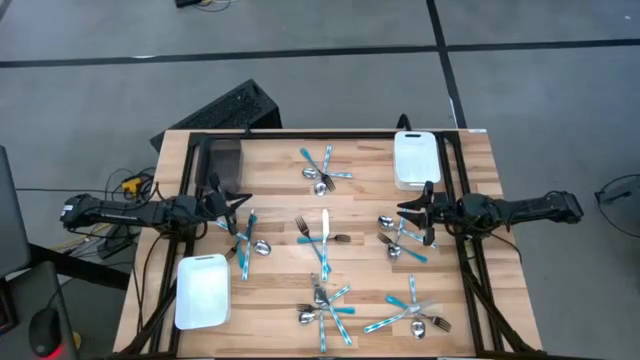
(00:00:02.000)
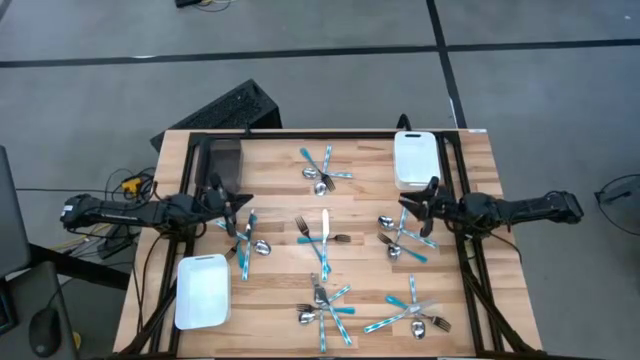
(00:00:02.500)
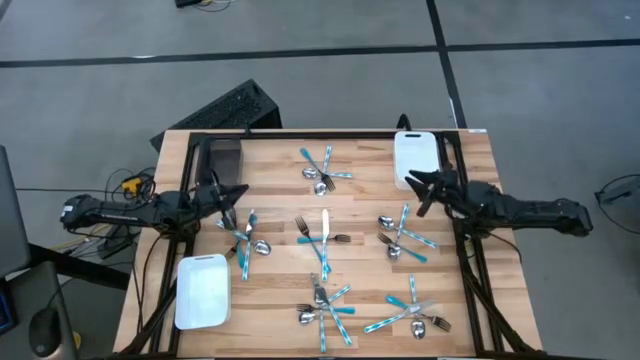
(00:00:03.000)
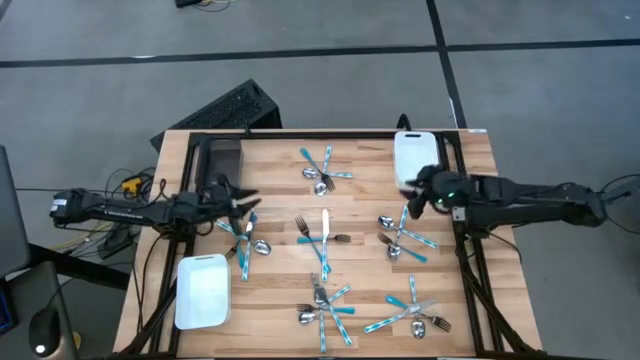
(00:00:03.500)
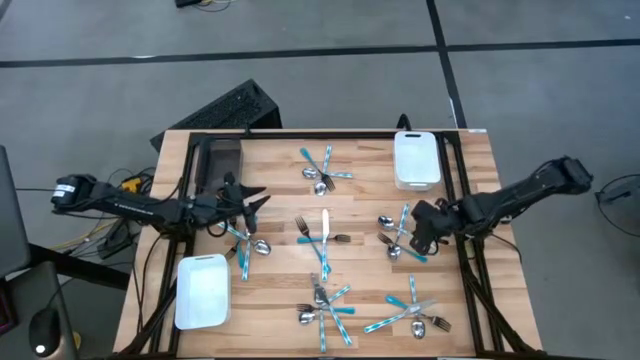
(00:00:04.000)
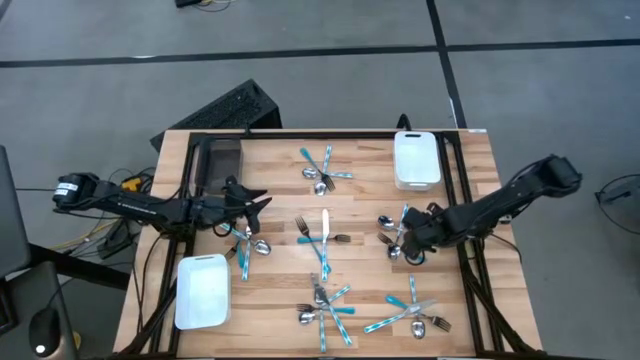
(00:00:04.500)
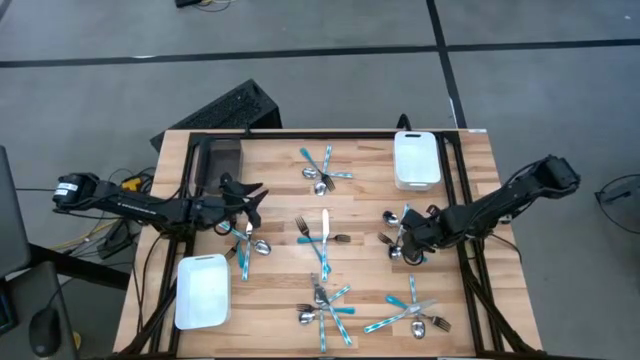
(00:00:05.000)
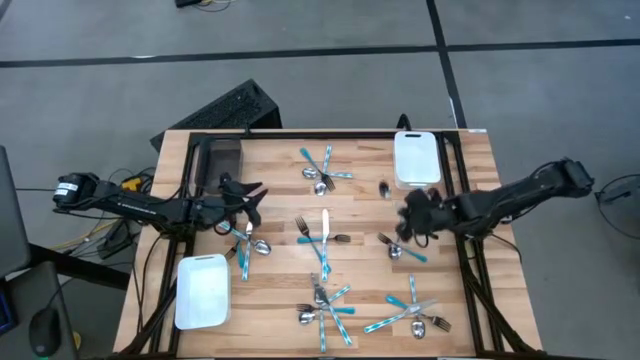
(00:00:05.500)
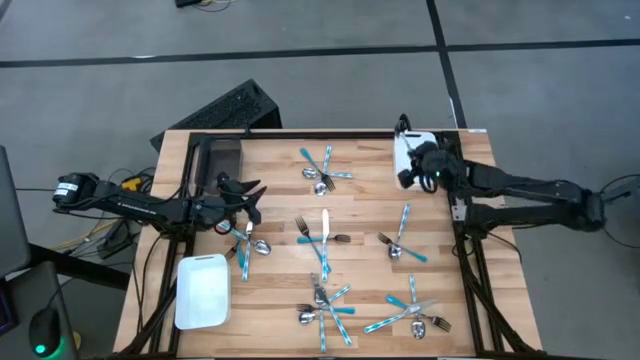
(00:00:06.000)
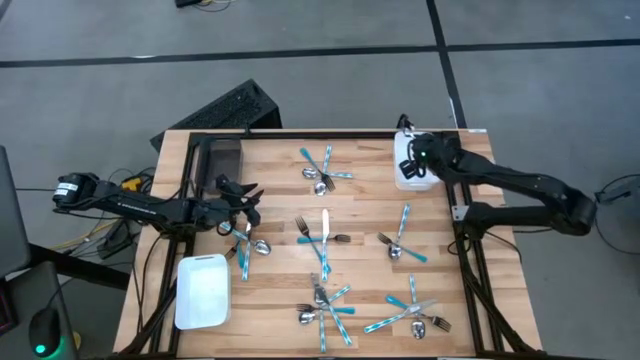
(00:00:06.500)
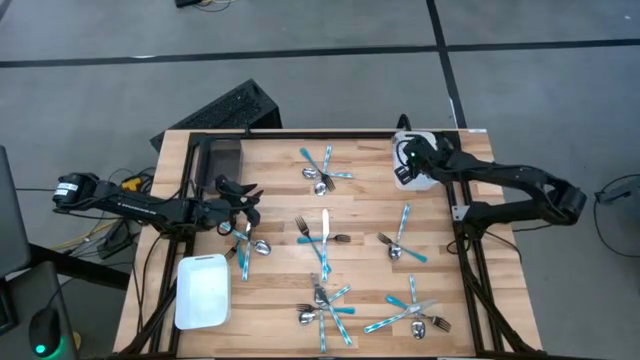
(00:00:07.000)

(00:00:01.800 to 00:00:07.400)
Task: Sort silverware by color (type)
Put the blue patterned spoon into the top right white bin

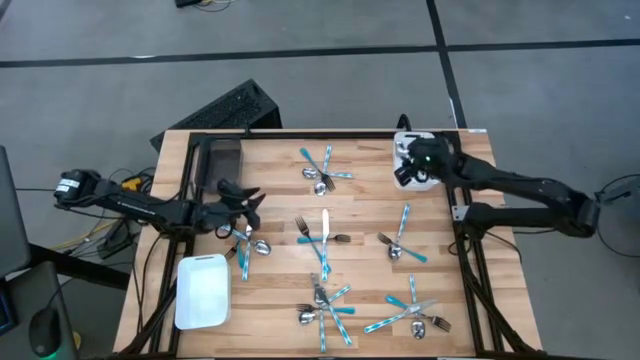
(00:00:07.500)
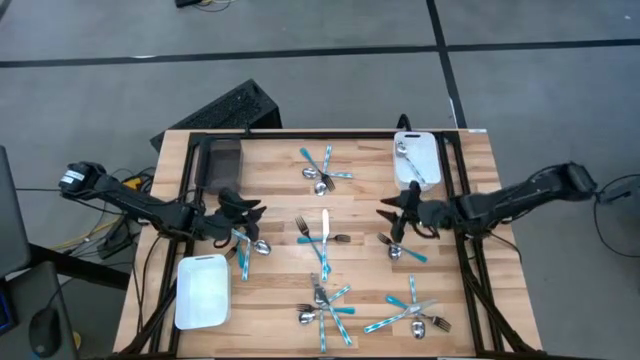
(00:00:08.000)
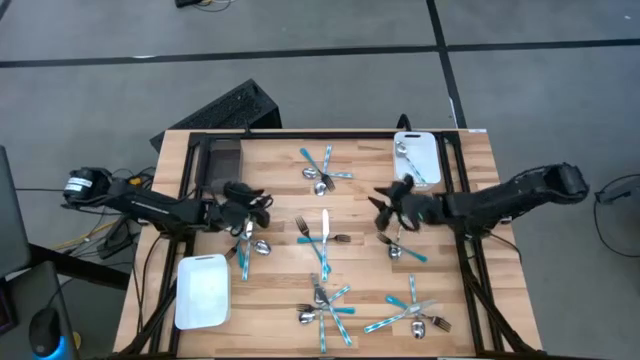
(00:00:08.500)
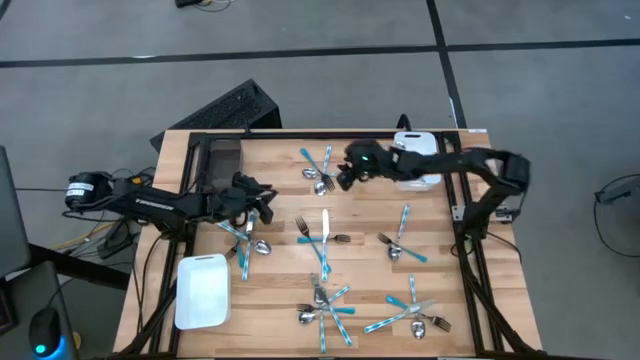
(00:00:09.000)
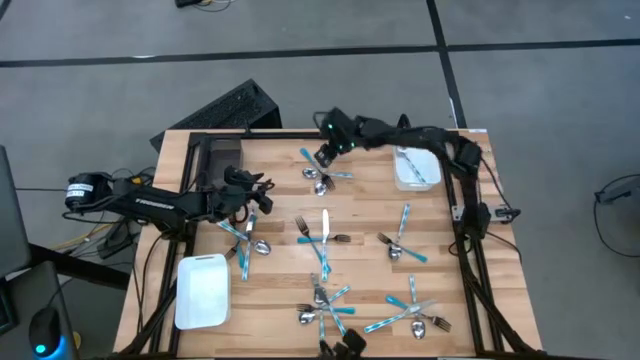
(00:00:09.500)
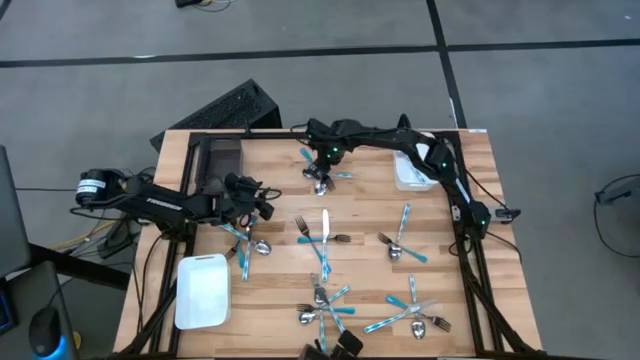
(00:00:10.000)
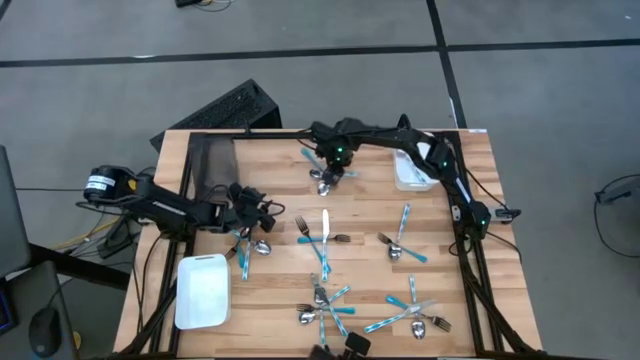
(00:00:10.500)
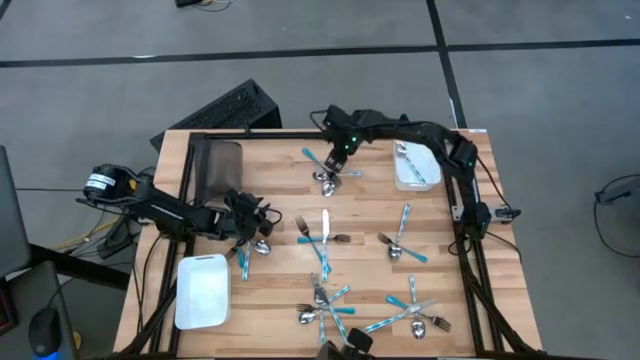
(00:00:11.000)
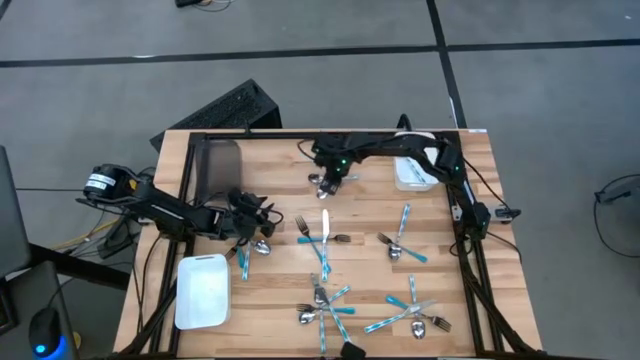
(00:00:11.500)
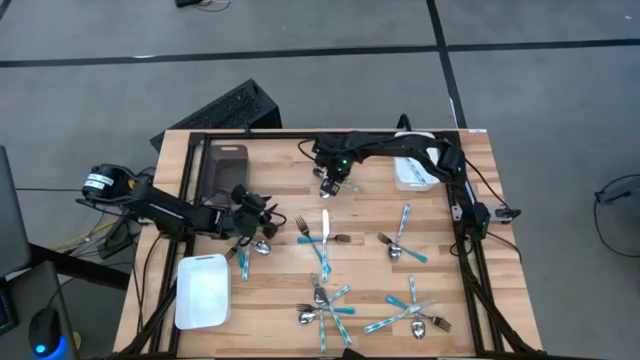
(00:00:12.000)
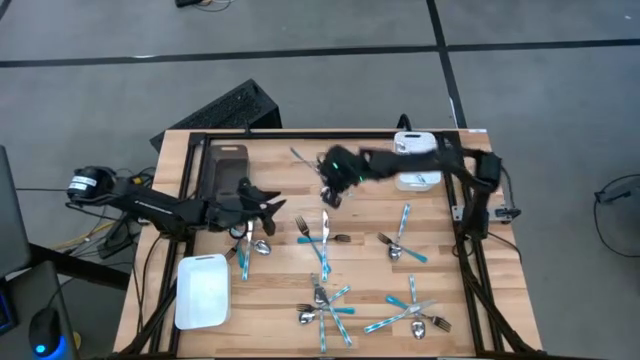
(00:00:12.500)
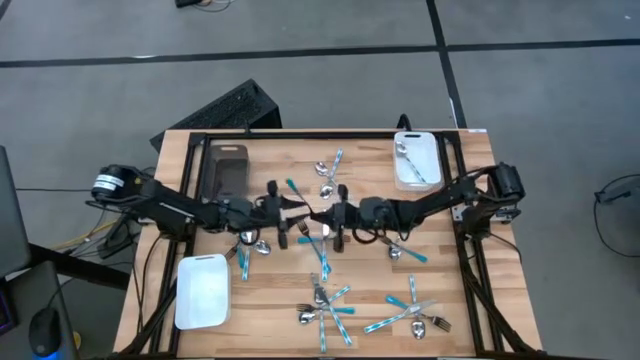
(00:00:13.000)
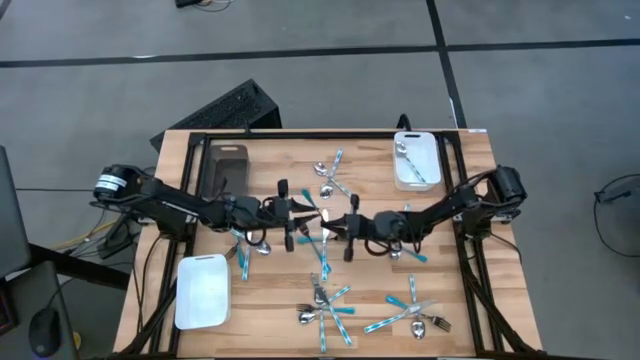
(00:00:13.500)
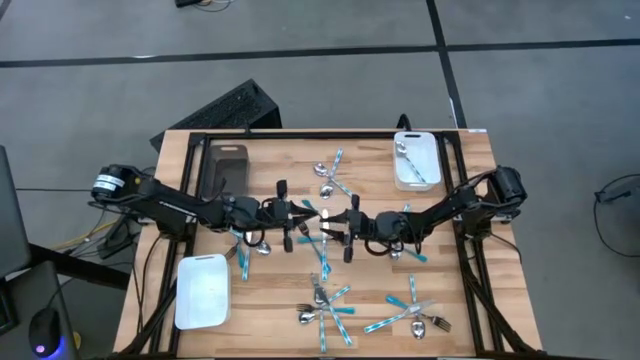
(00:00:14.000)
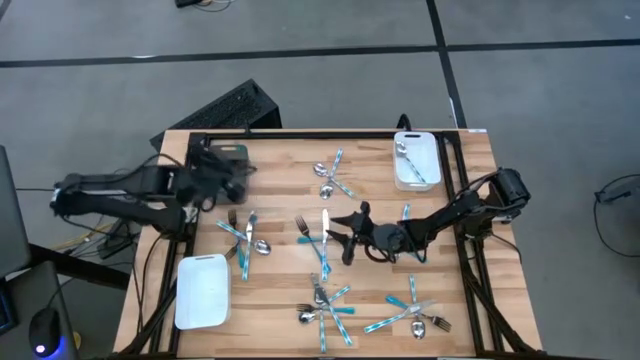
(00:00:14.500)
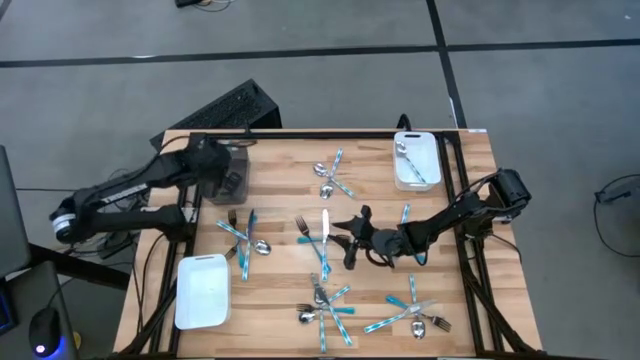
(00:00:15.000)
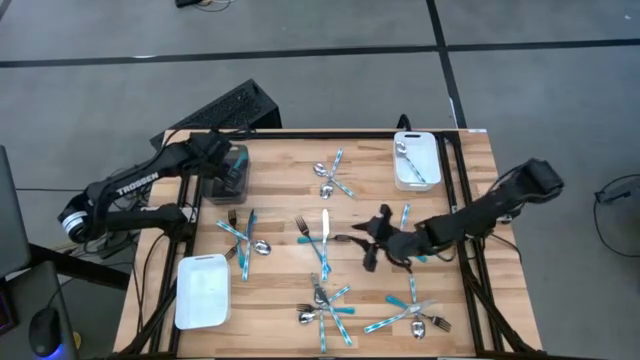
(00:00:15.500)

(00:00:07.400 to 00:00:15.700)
Put the blue fork into the black bin

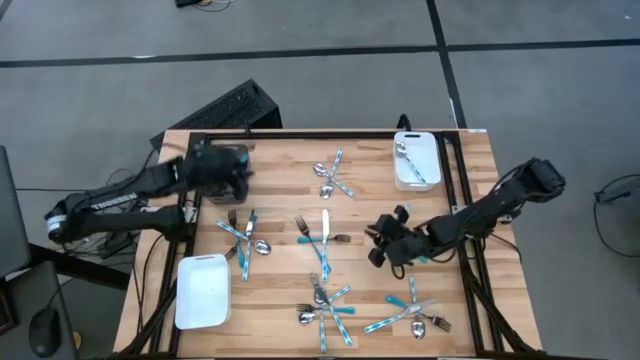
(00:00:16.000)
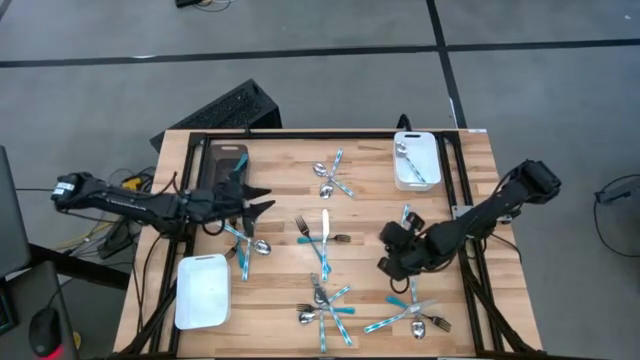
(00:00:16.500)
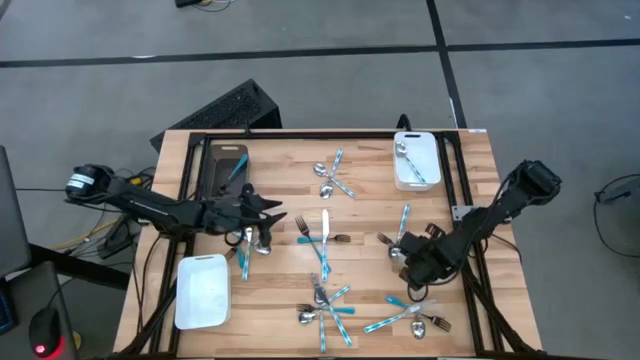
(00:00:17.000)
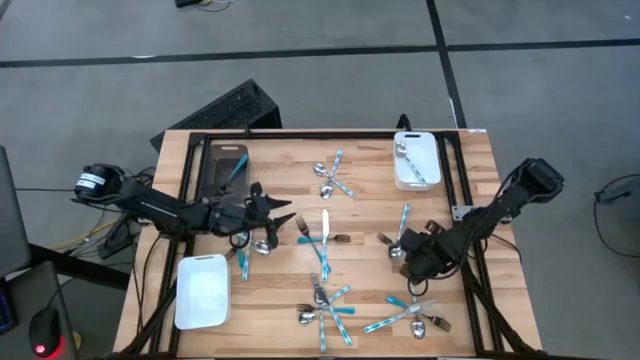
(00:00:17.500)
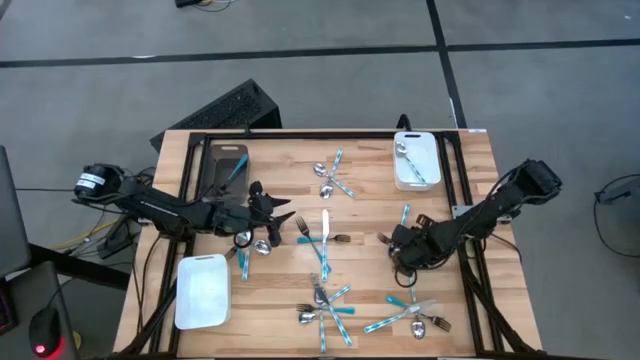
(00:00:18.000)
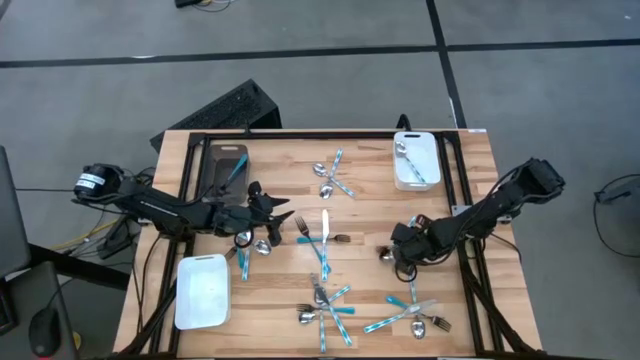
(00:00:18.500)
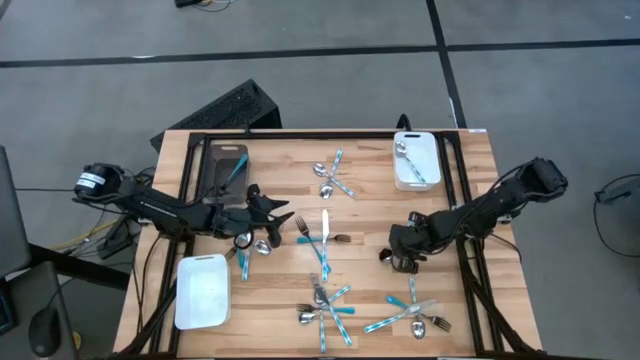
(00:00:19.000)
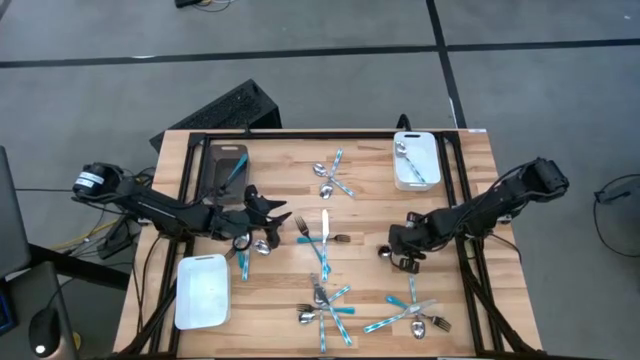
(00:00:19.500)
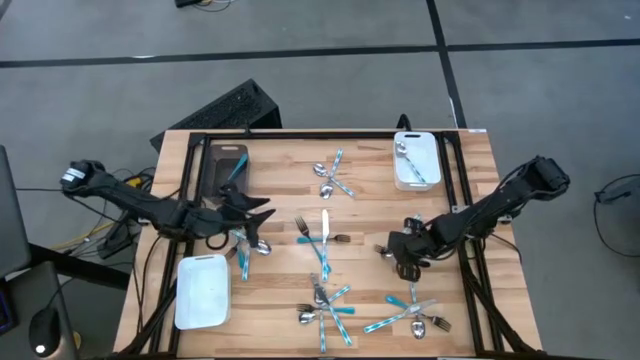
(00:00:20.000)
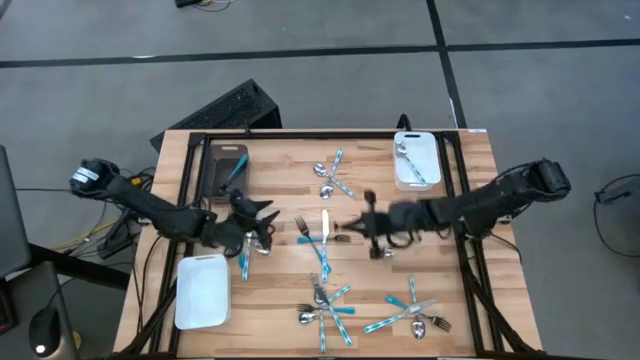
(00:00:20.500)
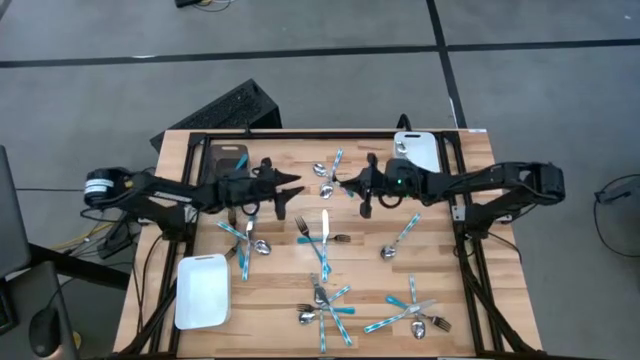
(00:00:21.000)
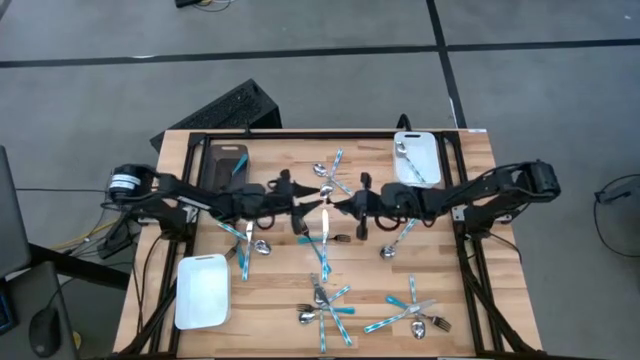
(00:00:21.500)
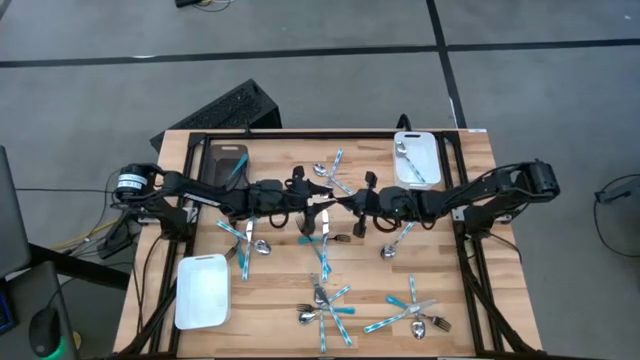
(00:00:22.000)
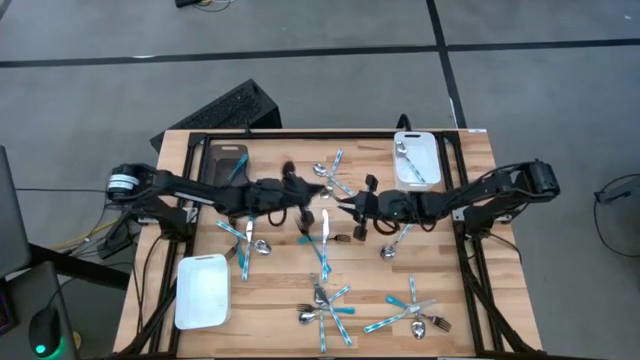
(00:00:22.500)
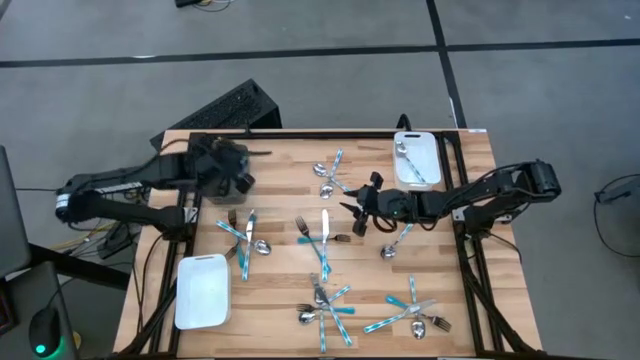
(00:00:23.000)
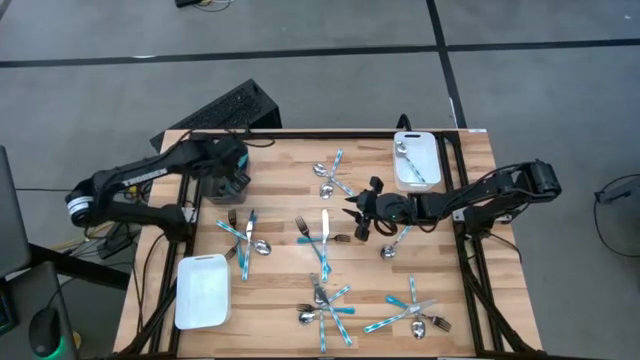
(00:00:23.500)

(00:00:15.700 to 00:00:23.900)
Put the blue fork into the black bin
